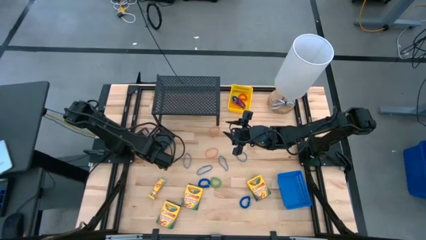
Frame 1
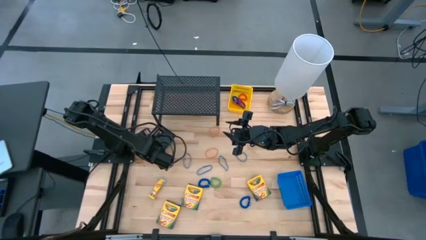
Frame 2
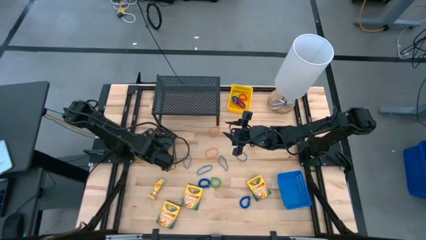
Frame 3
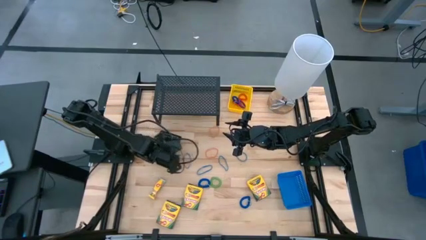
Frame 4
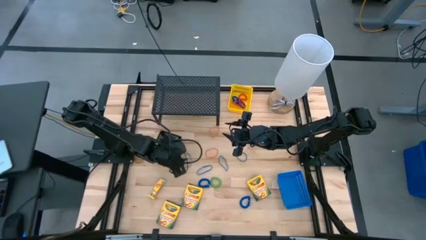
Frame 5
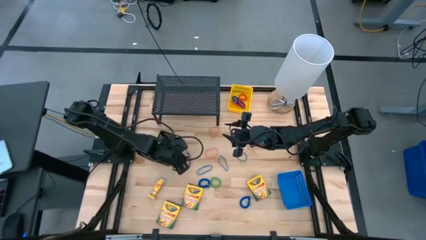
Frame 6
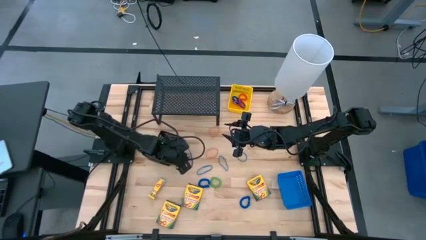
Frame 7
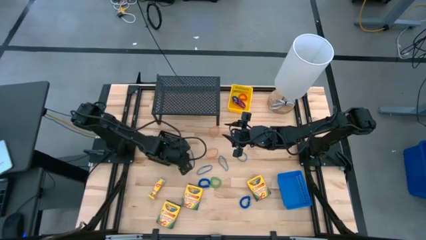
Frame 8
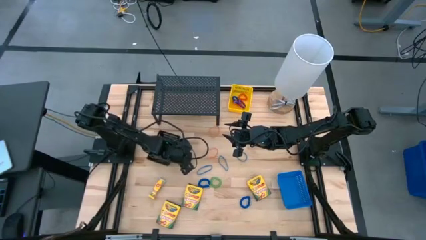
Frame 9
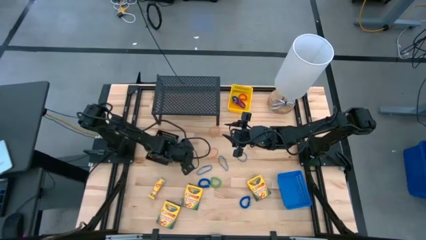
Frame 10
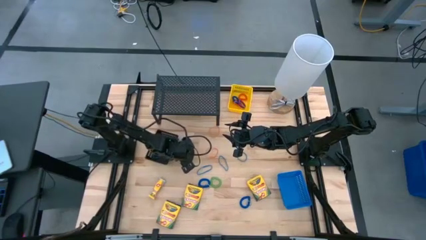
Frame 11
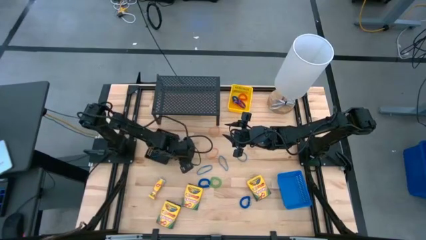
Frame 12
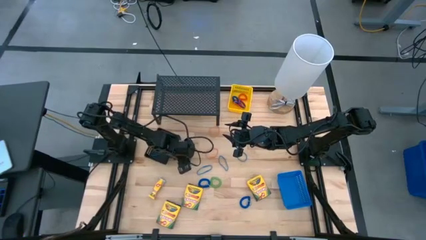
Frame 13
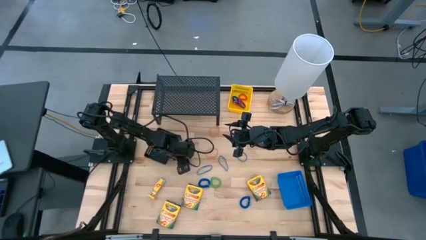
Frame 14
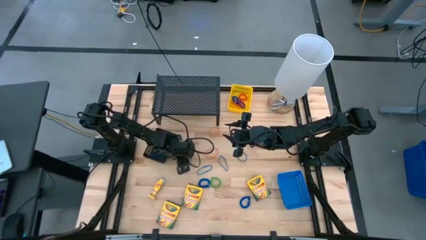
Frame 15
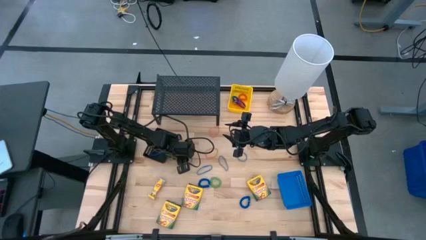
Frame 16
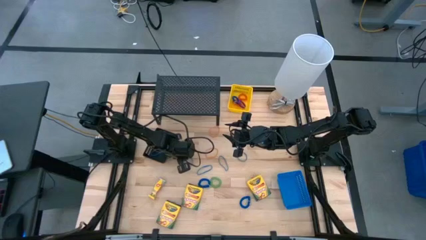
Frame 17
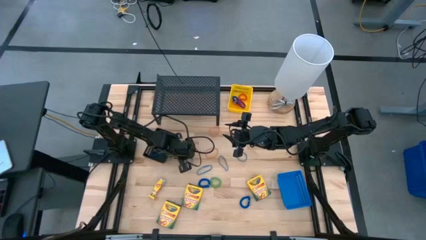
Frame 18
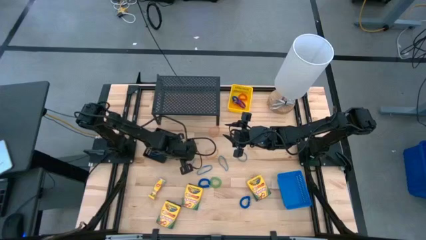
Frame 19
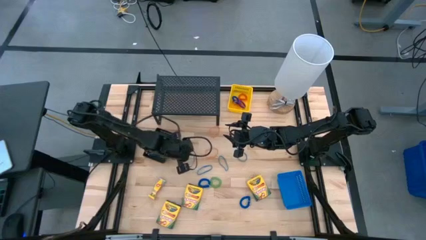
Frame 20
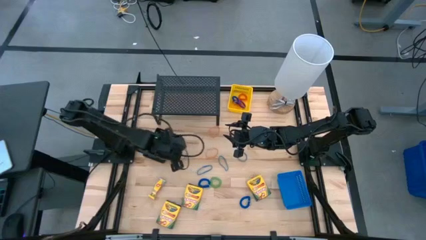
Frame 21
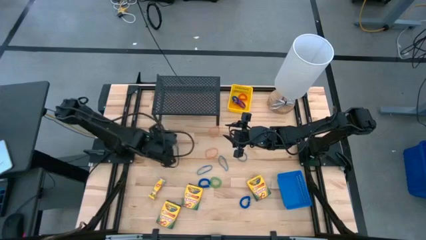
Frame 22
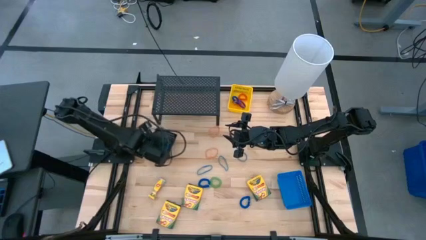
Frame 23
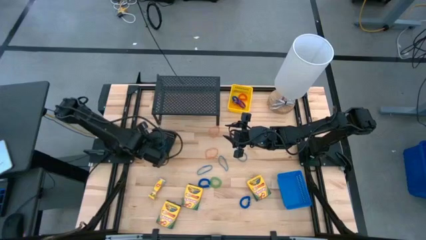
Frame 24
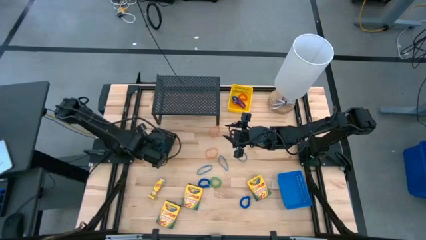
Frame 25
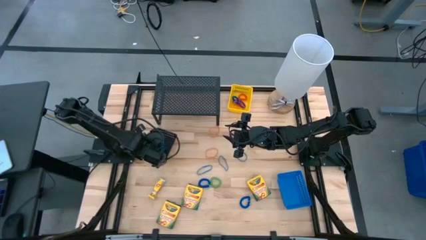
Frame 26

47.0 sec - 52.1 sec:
Task: Pick & Place Office Desk Supplies
Put the blue rubber band into the black bin

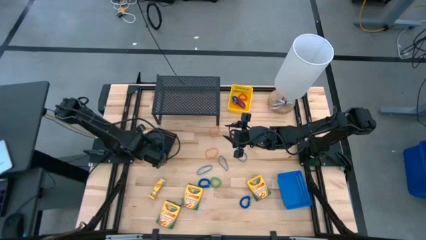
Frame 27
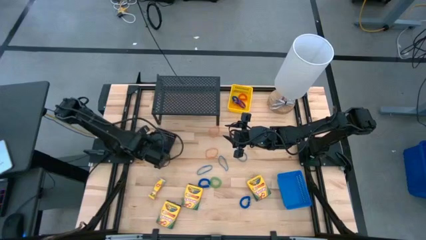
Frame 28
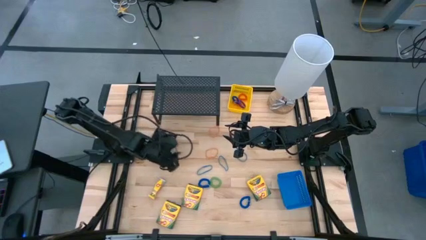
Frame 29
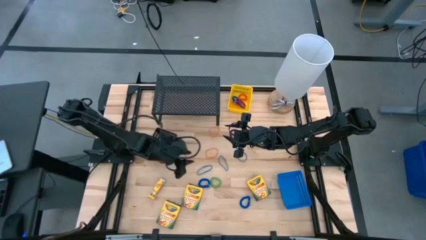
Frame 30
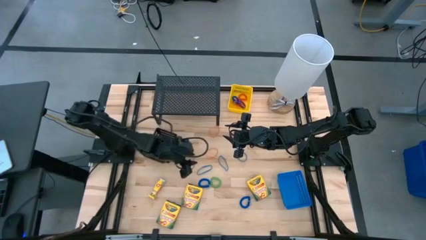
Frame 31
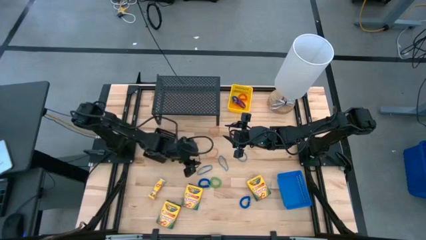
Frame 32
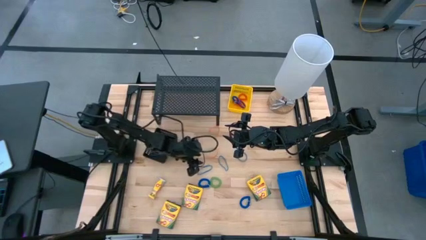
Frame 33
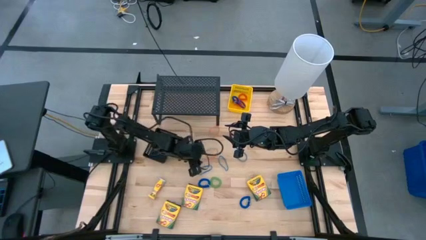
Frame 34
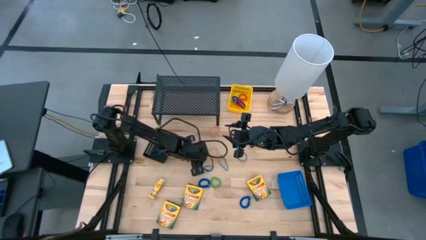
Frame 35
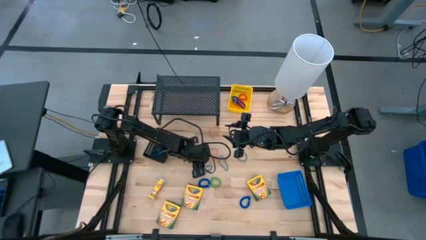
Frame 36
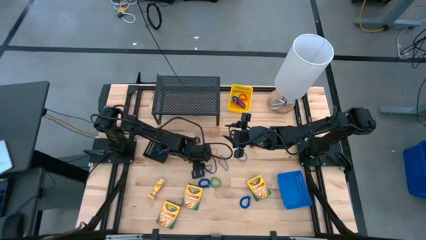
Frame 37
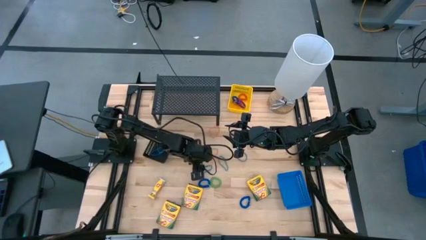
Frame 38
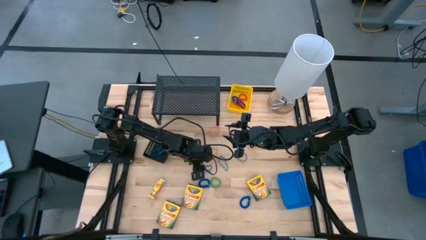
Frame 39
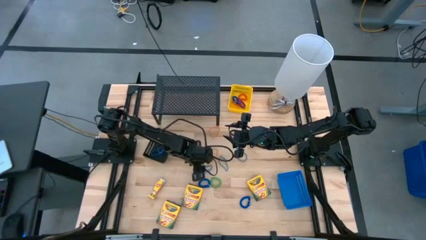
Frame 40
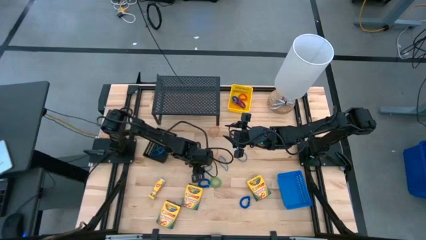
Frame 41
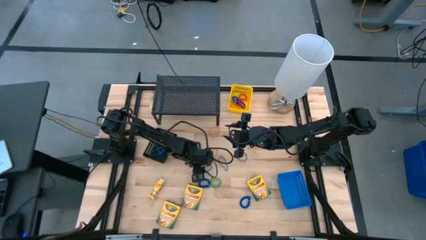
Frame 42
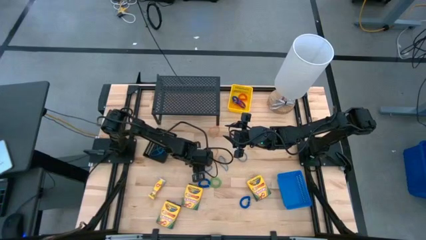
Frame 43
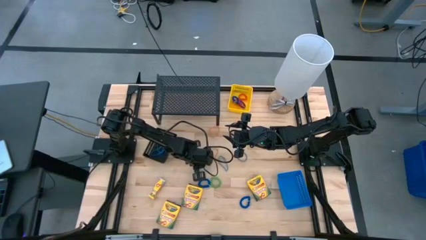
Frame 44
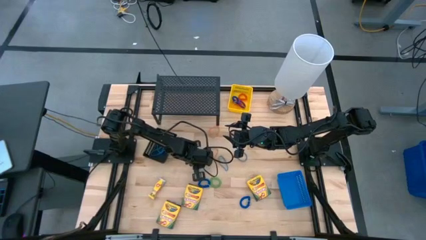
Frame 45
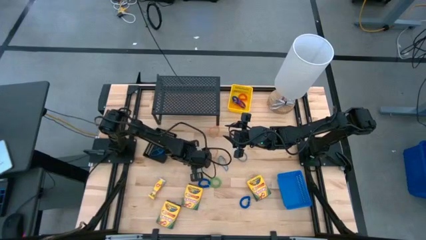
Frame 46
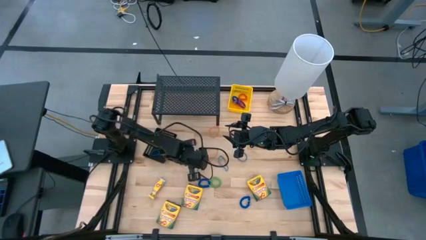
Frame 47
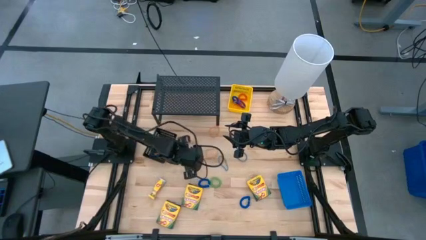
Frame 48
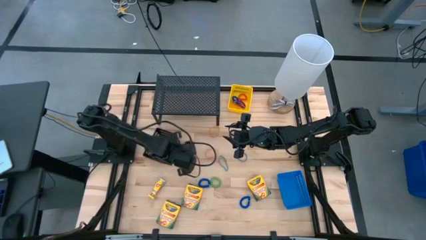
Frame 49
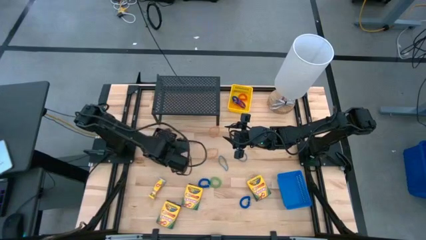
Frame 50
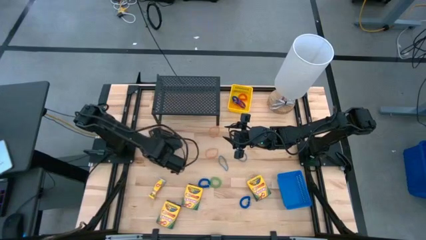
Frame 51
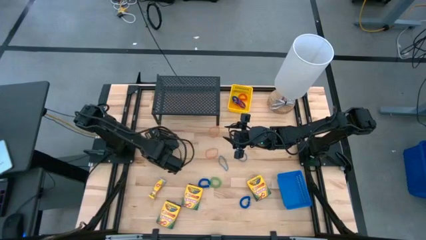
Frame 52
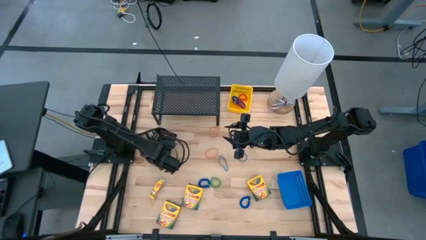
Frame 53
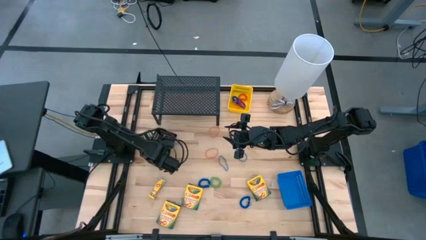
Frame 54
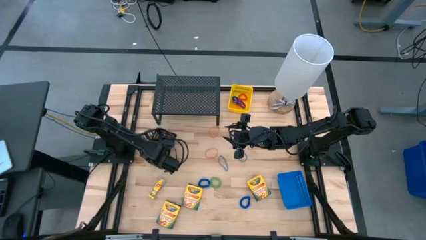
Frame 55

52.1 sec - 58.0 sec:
Put the bottom left blue rubber band into the black bin

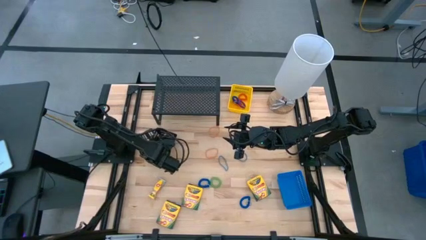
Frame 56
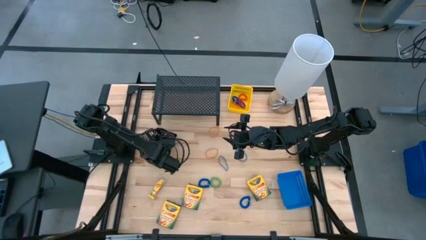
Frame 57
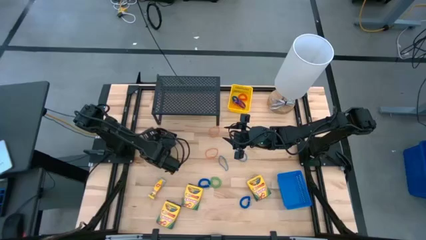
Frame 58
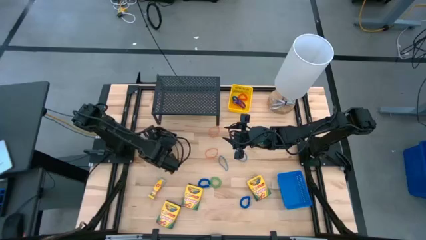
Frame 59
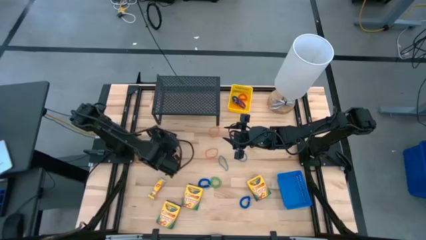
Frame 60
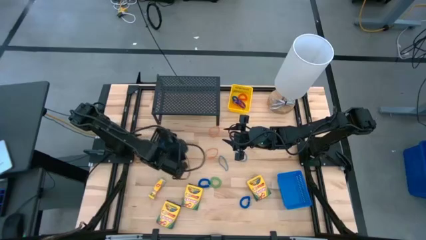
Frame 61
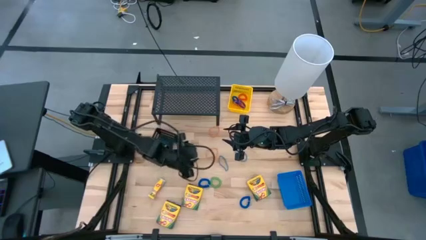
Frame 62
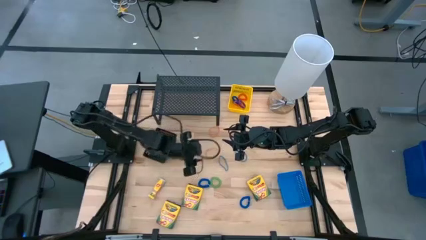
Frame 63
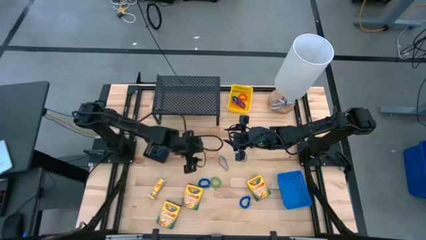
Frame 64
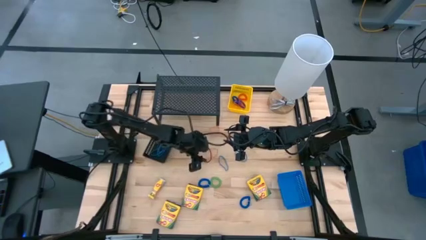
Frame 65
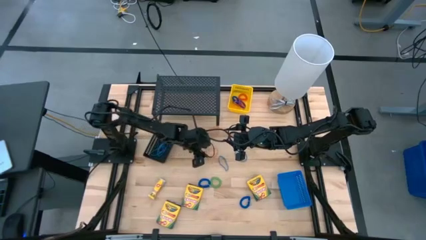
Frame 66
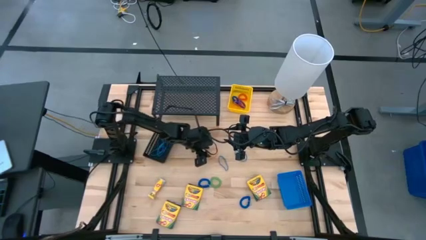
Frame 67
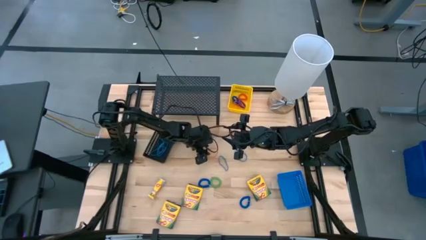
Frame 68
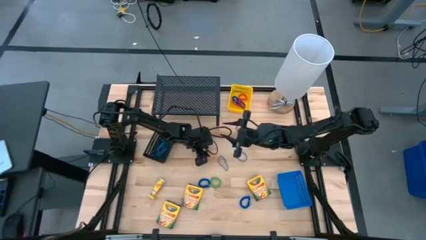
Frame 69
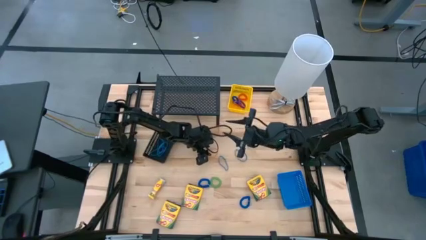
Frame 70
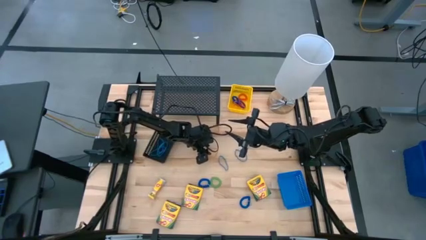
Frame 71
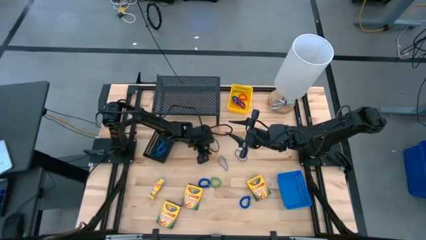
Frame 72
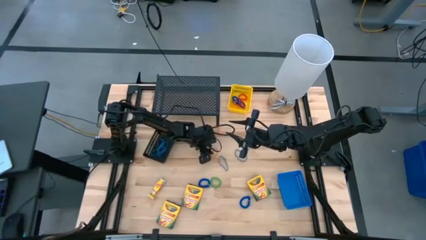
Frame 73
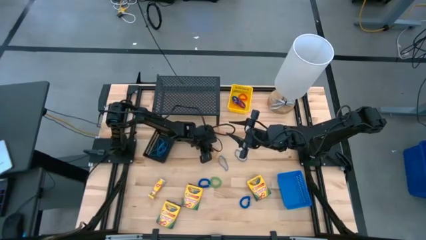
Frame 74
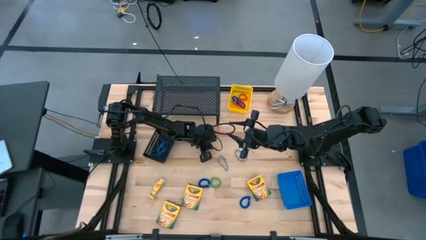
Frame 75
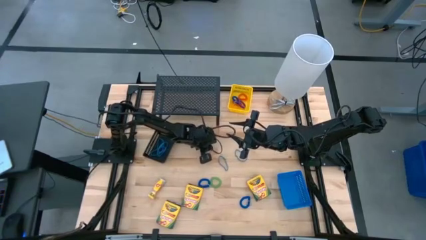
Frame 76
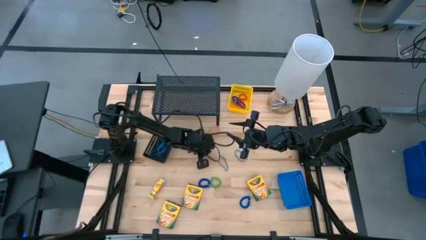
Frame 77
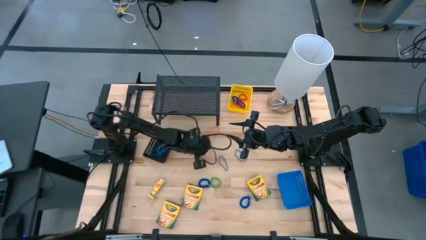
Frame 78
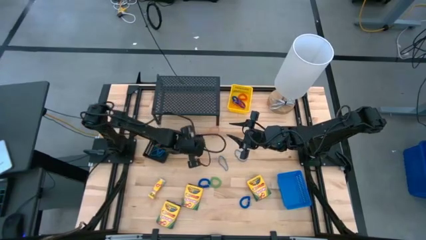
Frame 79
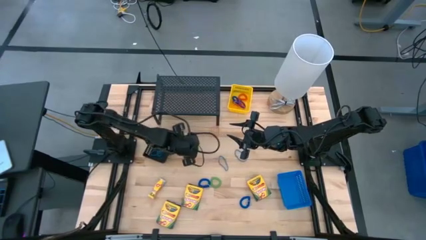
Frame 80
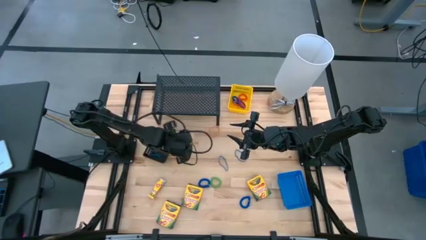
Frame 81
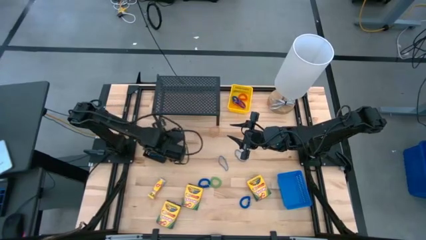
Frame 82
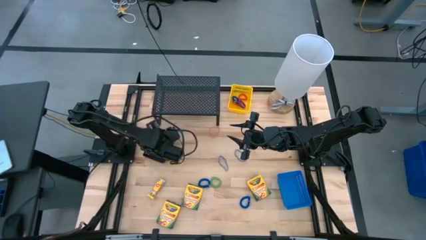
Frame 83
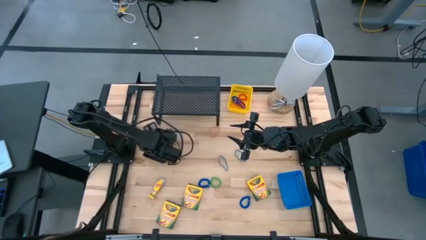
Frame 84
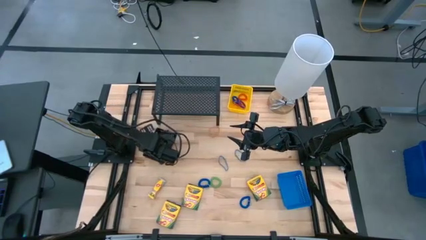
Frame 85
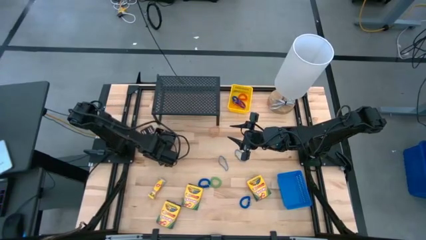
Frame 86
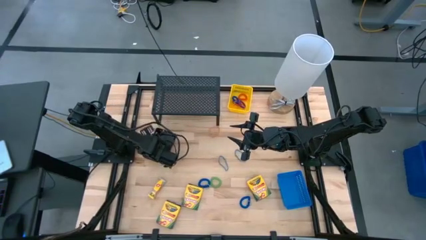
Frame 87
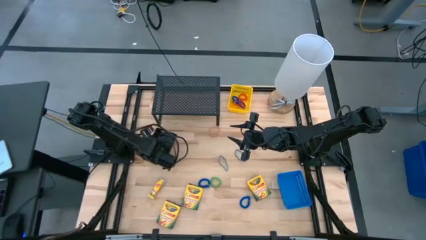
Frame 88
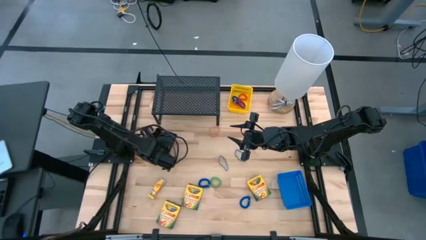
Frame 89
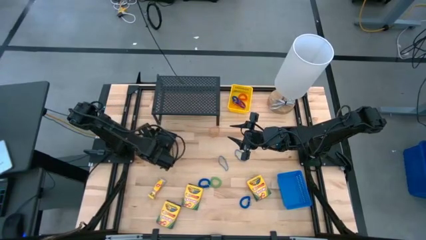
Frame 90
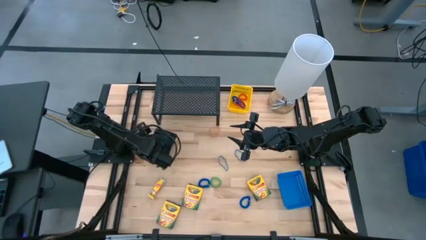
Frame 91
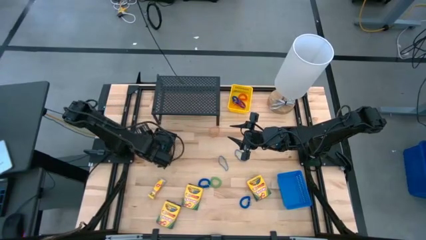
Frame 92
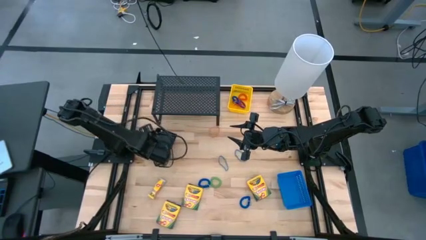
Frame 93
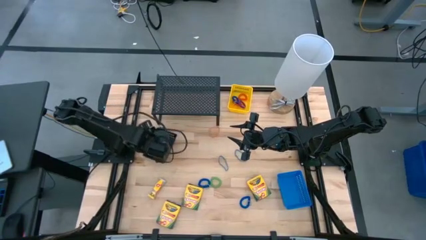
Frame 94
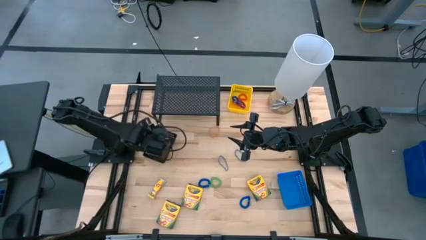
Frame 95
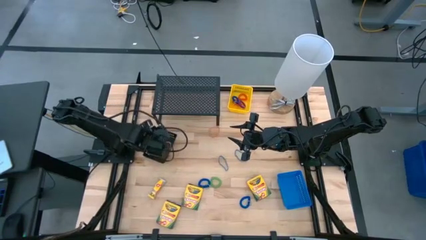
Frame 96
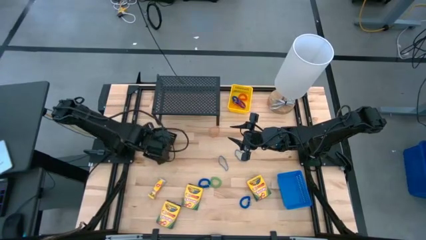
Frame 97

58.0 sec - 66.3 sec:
Put the bottom orange rubber band into the black bin
